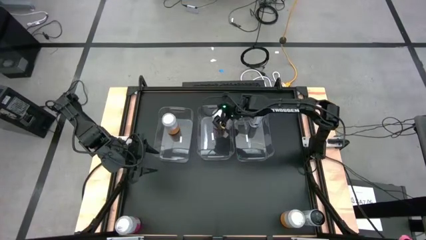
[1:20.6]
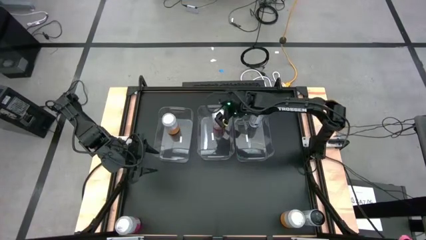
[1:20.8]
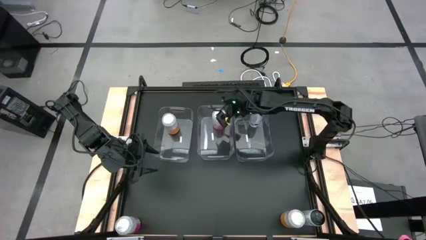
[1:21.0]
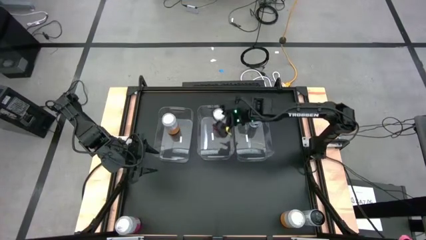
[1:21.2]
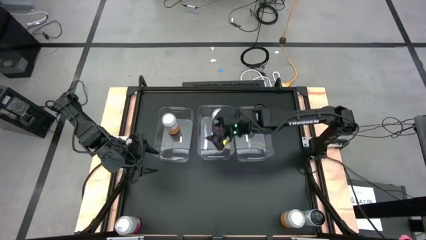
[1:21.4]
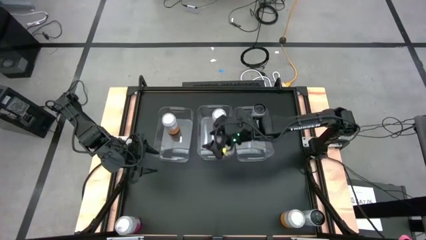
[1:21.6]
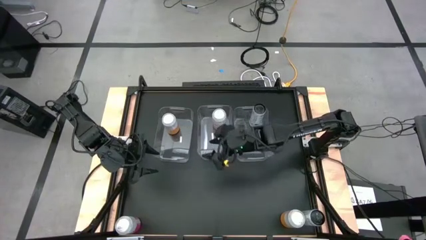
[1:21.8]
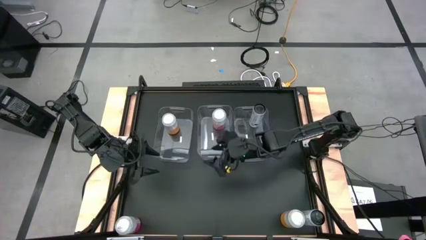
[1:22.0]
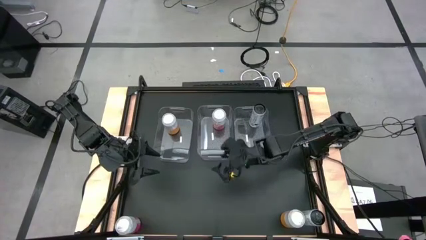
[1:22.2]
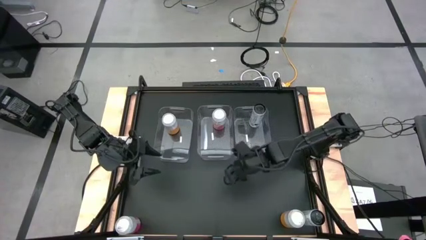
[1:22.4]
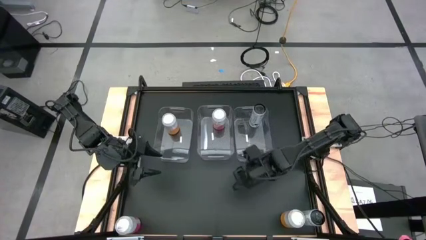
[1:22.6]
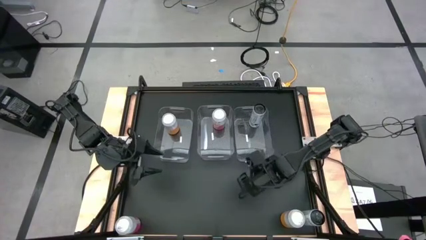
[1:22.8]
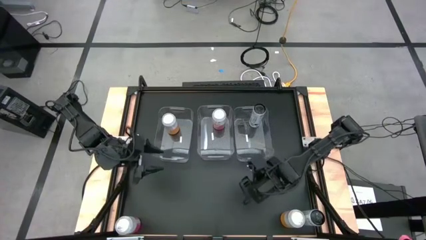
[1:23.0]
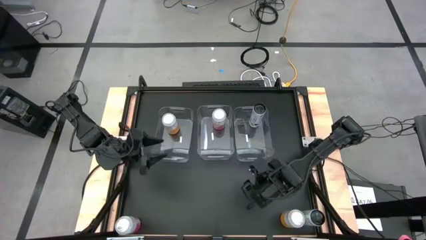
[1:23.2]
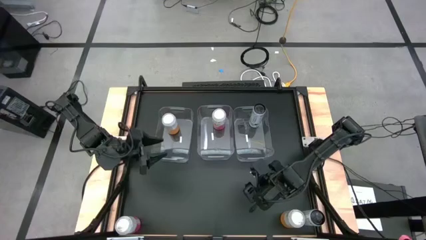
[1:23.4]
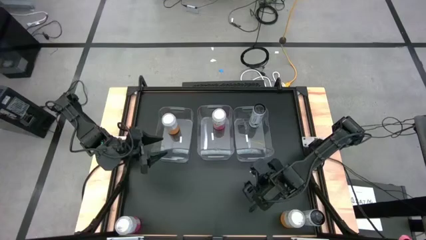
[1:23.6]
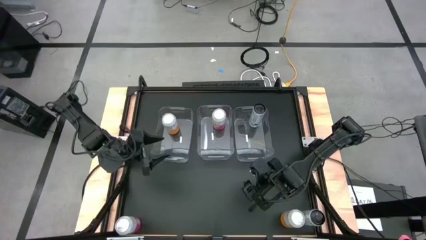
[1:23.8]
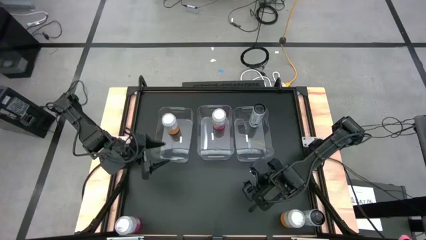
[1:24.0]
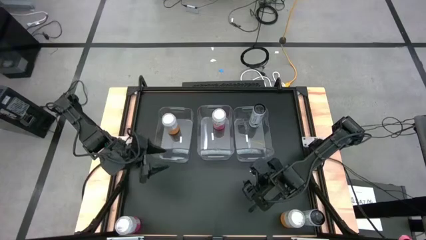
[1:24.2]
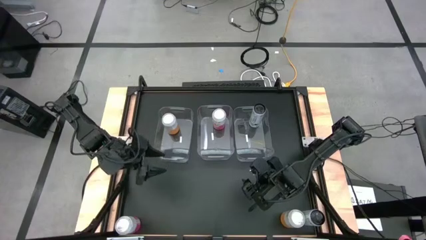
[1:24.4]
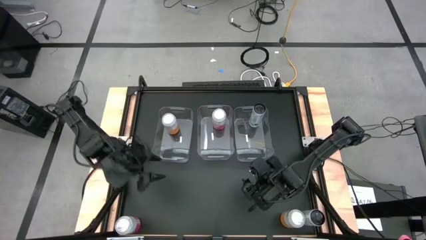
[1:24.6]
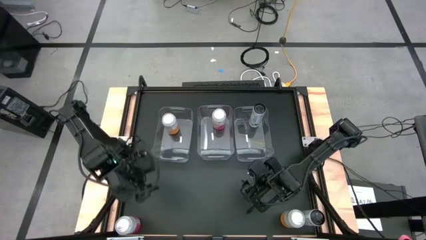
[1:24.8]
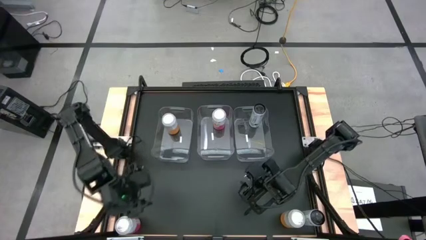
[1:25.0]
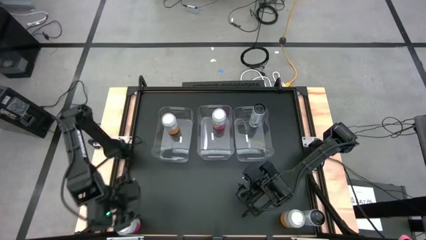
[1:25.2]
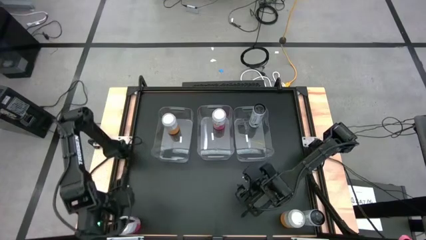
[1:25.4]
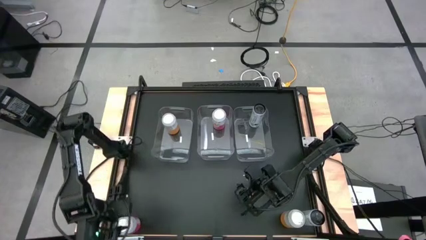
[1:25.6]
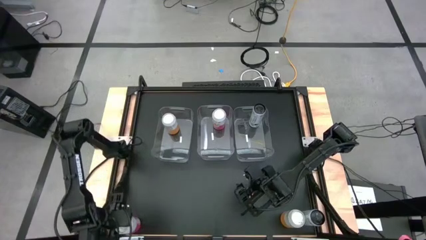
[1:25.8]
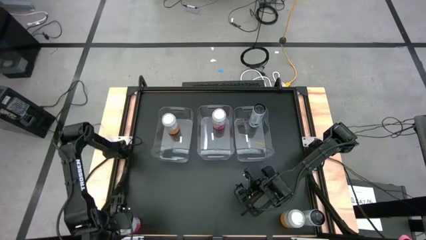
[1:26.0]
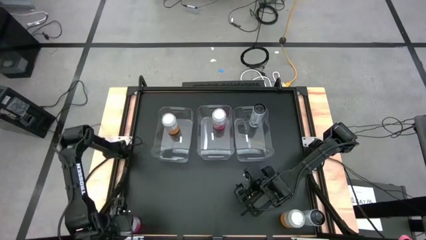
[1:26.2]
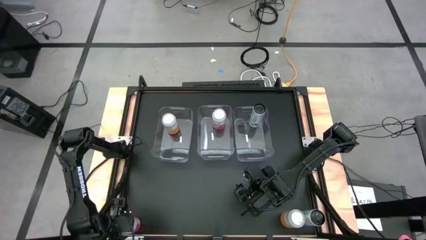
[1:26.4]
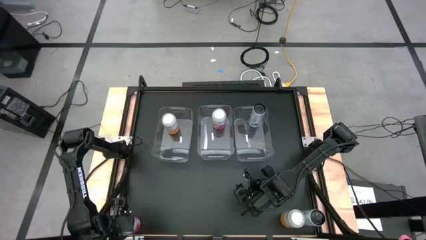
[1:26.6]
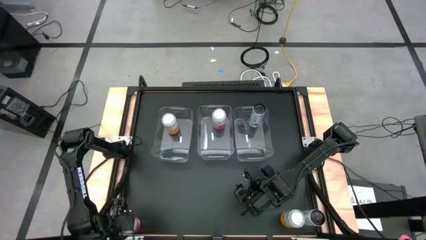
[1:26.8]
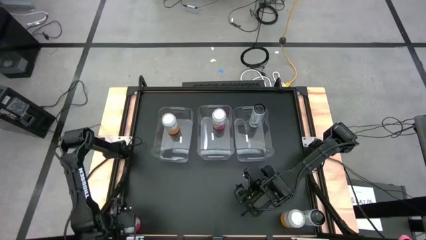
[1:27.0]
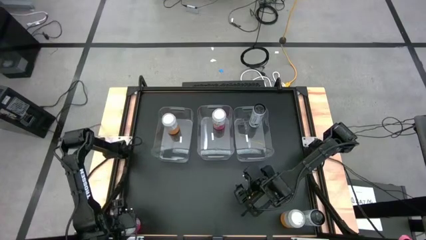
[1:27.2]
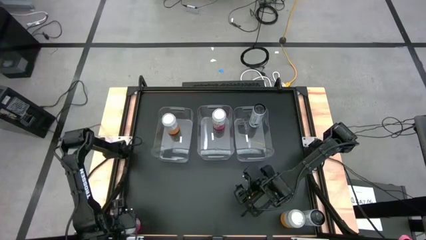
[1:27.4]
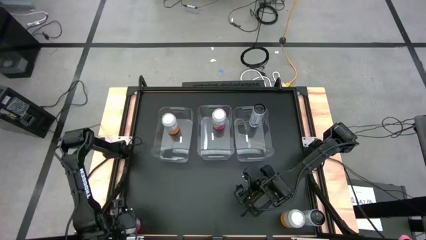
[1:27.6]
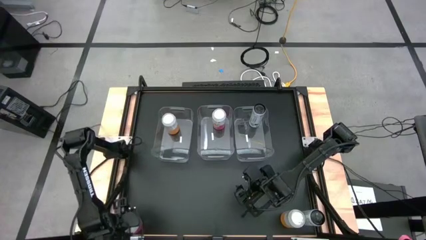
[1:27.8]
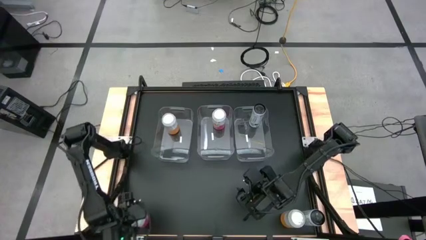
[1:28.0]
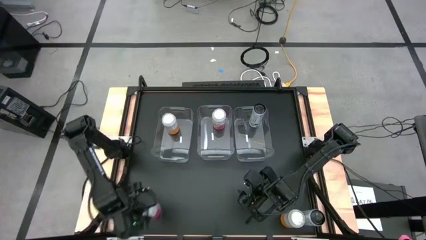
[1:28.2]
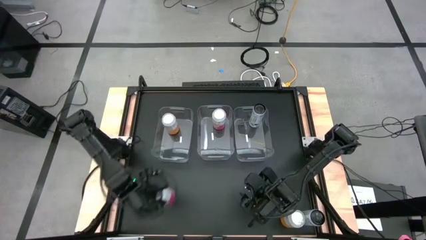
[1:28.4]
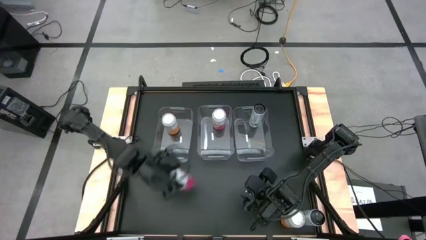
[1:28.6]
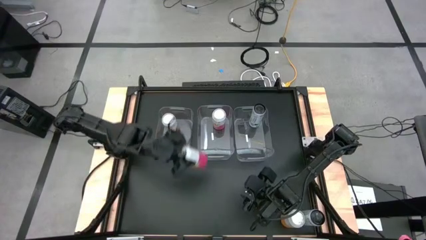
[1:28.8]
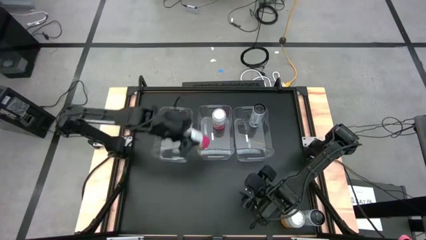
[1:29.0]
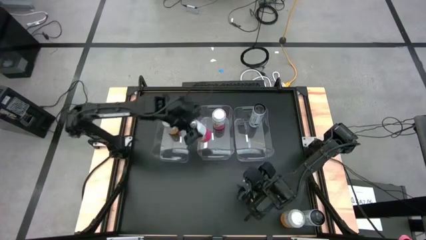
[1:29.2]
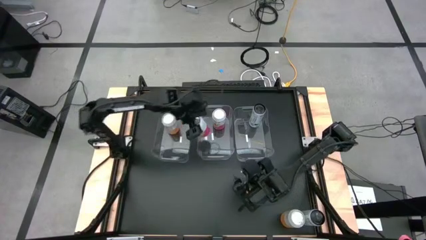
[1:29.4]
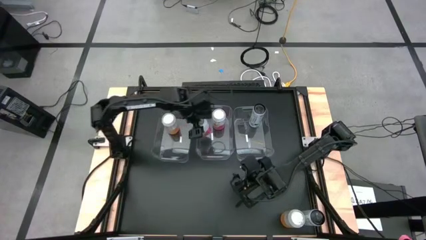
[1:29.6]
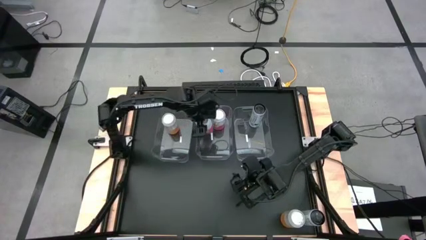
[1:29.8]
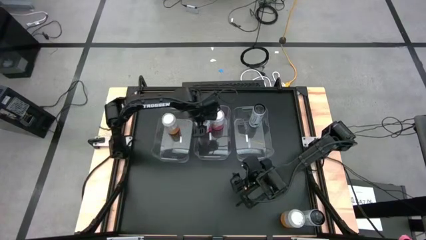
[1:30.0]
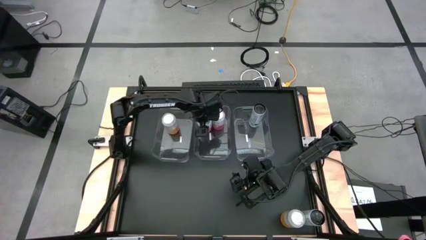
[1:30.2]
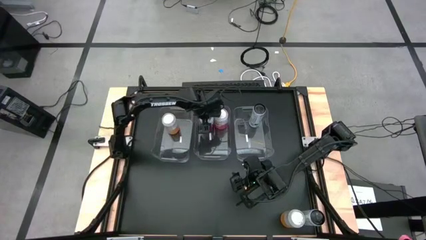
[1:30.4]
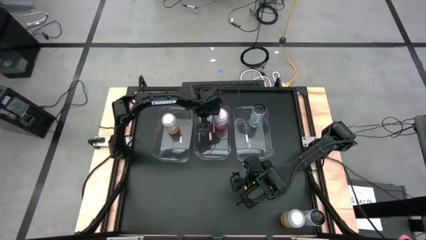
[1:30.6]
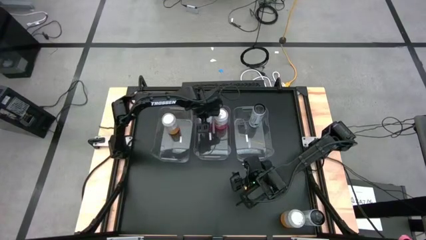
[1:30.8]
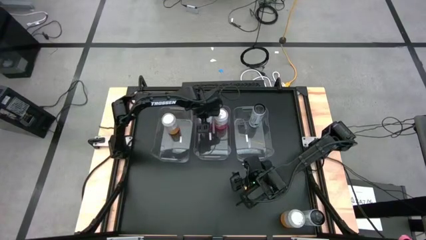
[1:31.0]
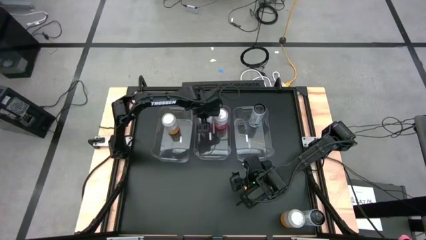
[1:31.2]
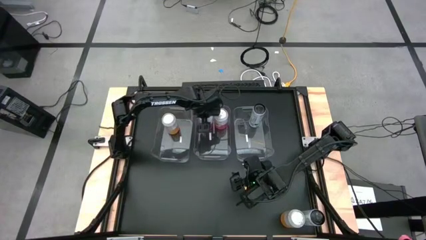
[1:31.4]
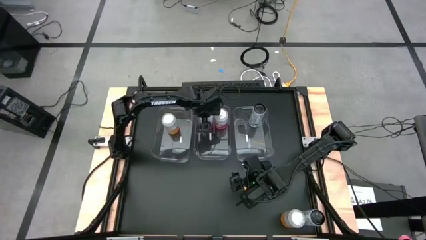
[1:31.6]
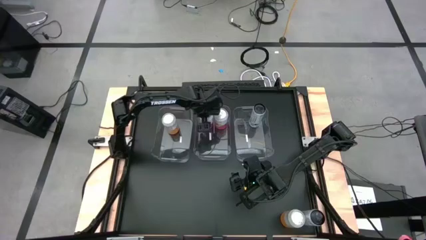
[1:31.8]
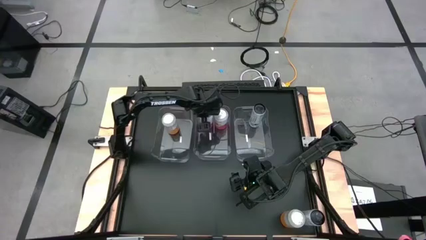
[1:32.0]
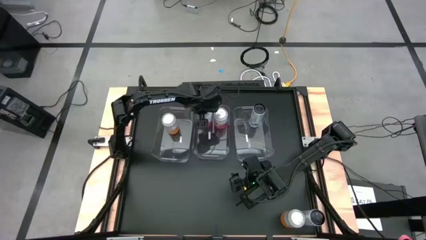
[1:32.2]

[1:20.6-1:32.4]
Task: Sort soda cans
Put the pink-white soda can into the center transparent bin

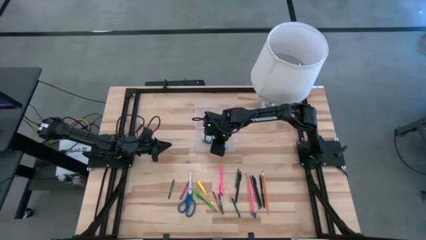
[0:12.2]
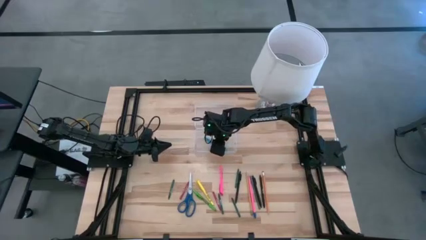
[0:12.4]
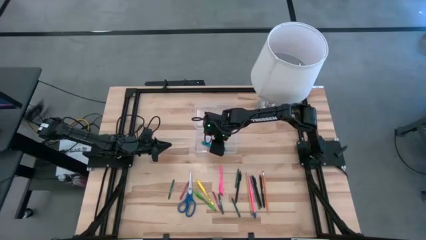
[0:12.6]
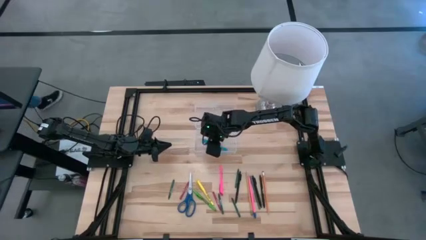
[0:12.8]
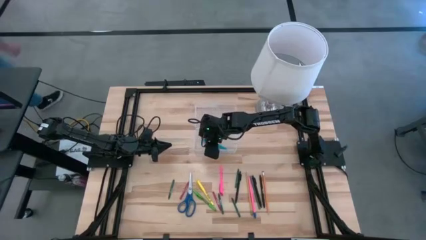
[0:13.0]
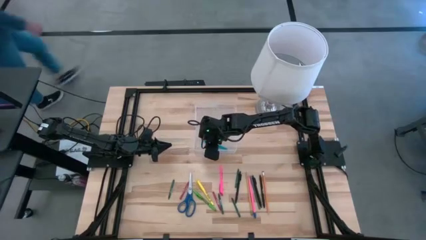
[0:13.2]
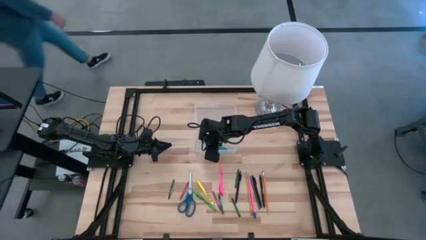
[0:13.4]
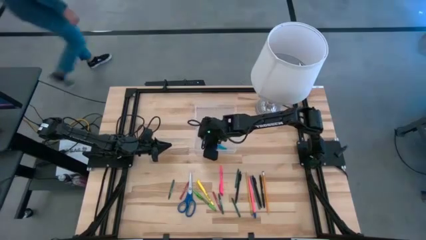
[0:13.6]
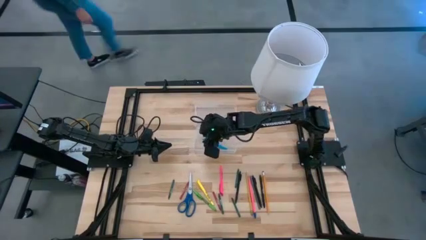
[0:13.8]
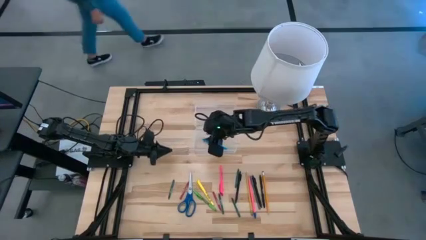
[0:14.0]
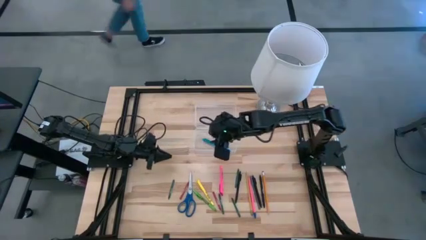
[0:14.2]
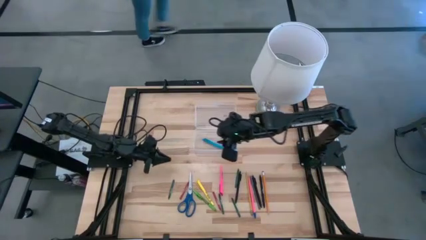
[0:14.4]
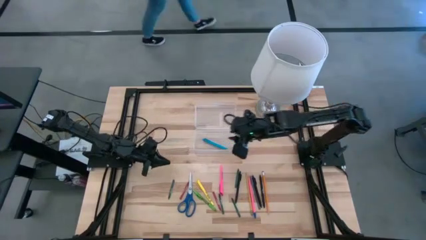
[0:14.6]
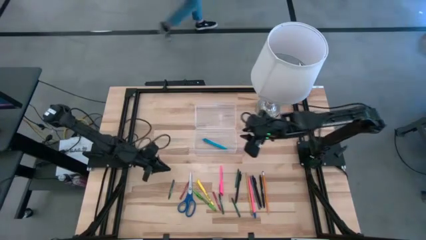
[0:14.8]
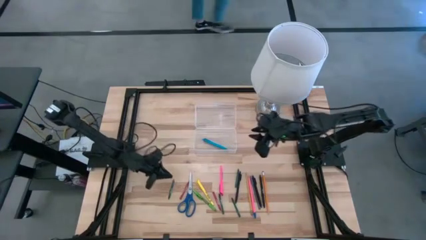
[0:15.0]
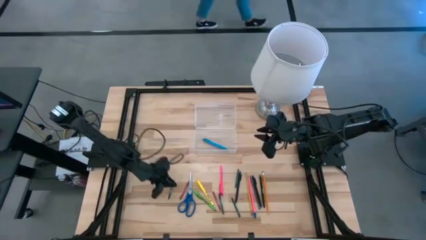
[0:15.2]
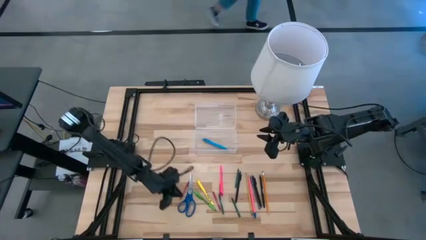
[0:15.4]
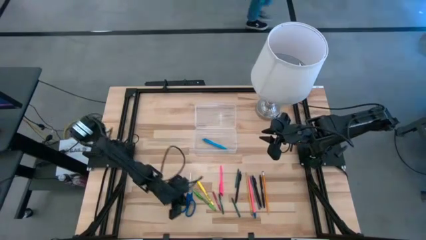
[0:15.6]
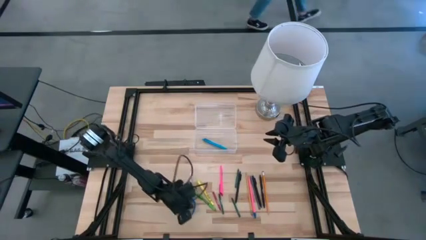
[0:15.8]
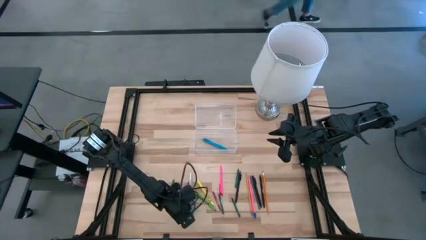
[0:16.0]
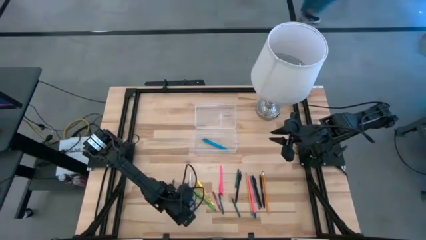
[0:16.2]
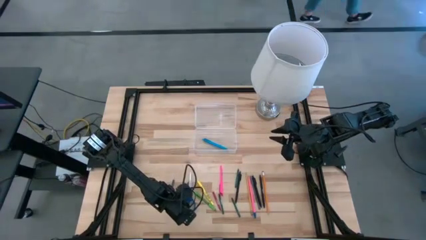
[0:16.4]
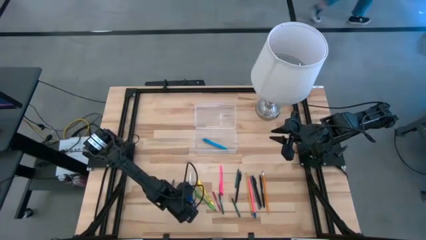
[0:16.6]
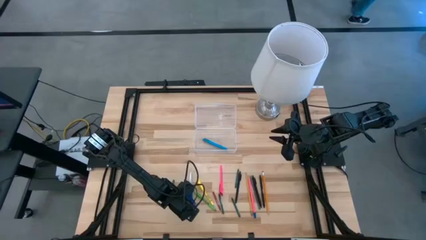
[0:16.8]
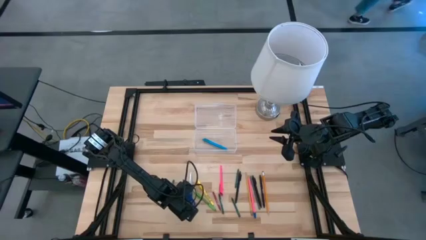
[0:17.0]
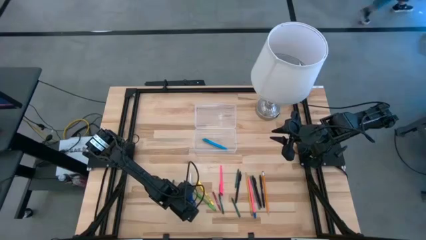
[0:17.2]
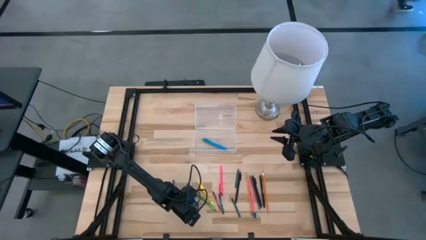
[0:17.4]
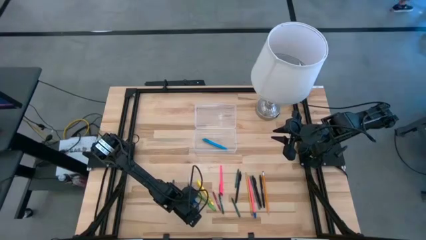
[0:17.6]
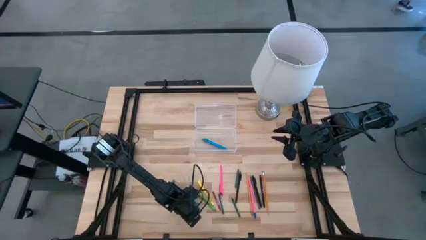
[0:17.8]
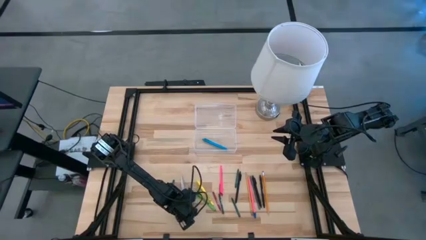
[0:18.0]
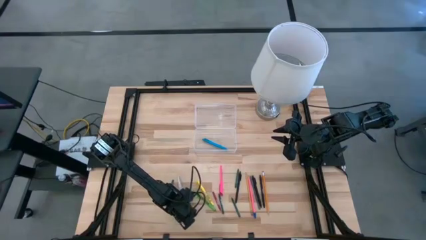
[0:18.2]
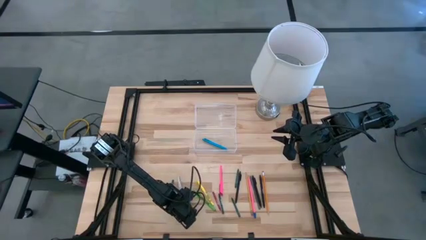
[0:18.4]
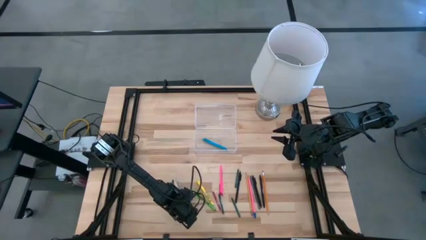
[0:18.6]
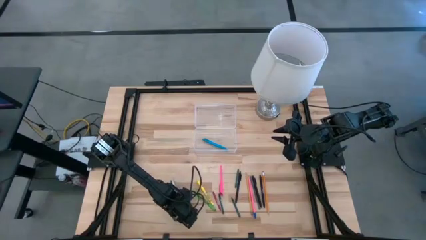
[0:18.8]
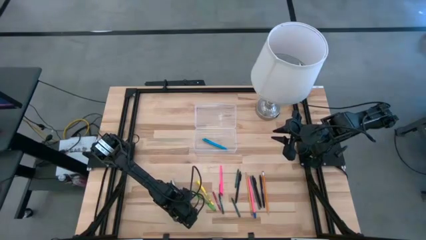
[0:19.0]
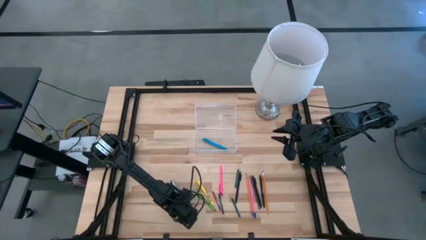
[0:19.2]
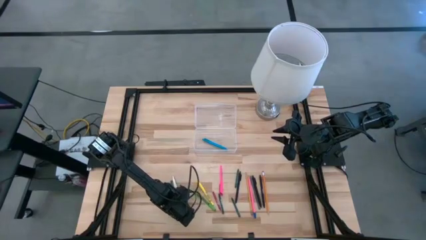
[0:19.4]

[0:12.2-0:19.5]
Task: Pick & place school supplies into a supply box
Put the blue scissor into the transparent supply box
